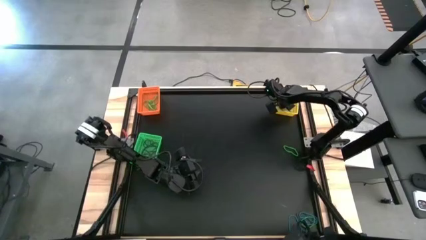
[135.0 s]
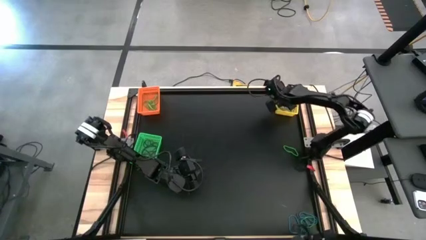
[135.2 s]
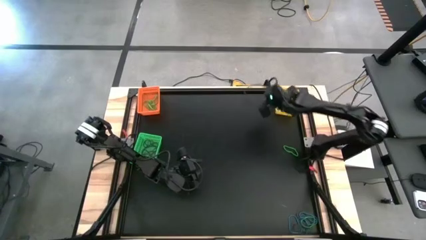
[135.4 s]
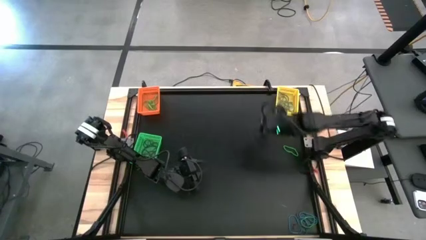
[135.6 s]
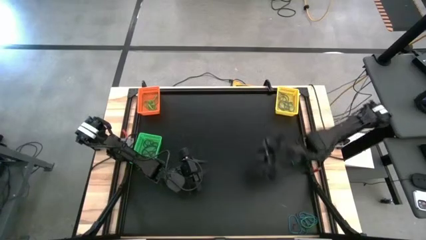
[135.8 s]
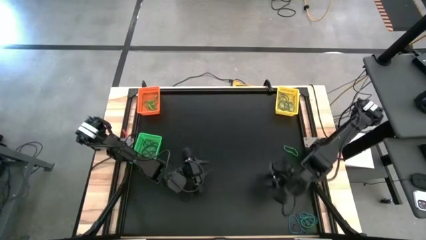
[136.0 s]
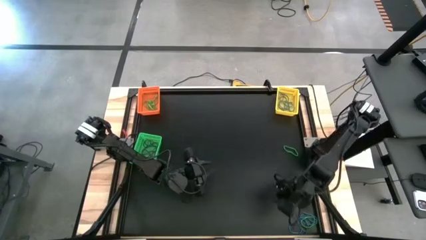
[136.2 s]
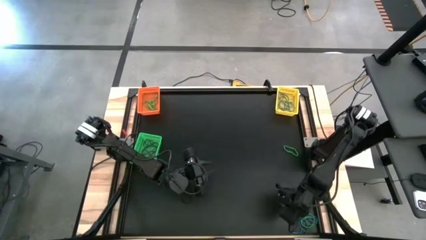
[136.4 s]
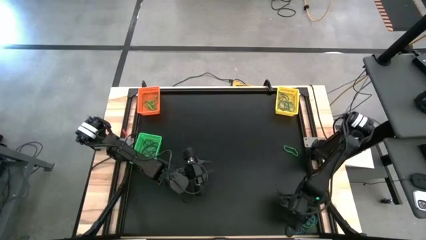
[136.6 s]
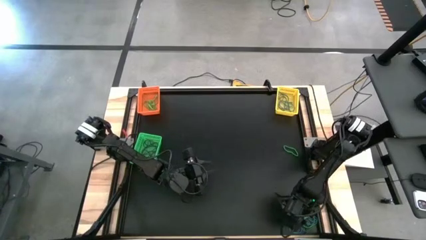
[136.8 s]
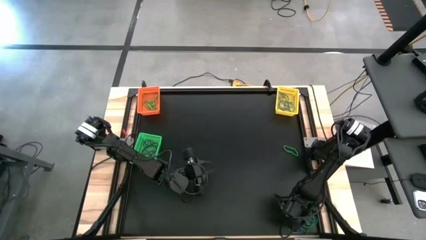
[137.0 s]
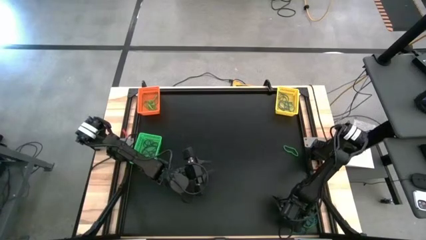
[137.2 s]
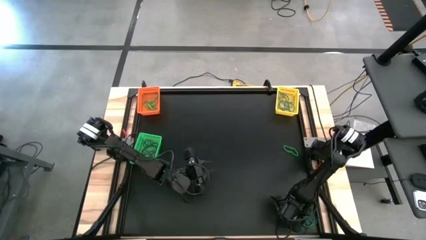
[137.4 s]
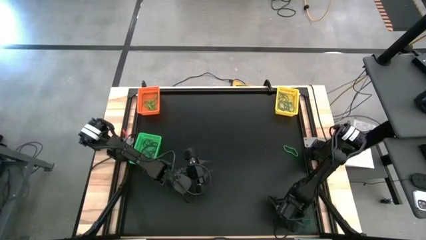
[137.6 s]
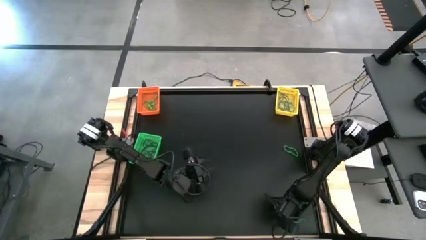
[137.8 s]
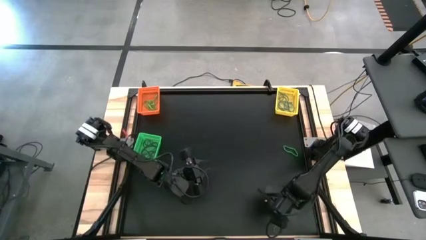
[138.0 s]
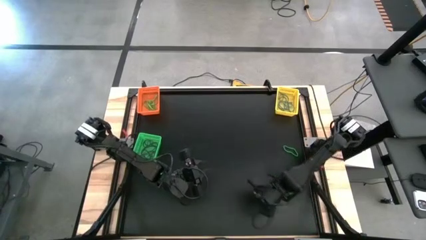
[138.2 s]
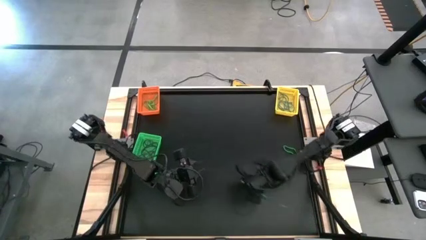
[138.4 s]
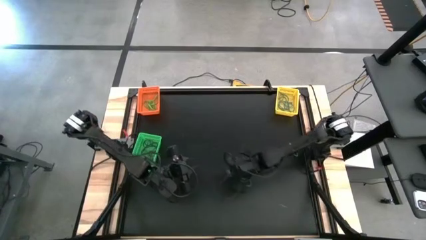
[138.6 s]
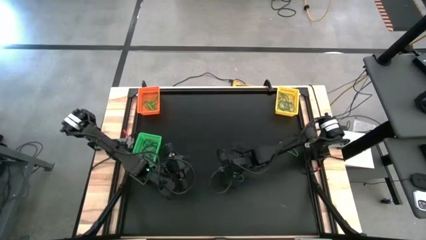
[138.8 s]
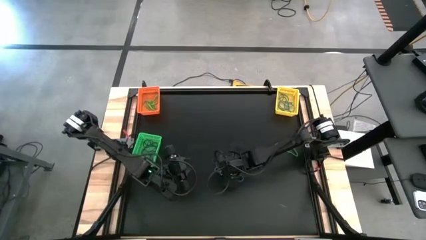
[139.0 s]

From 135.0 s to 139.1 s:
Task: Sort rubber bands into baskets
Put the rubber bands into the center of the table

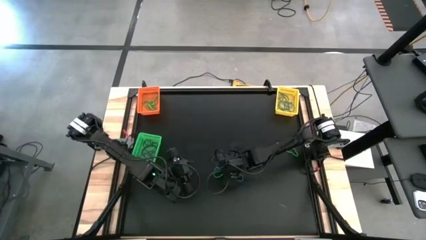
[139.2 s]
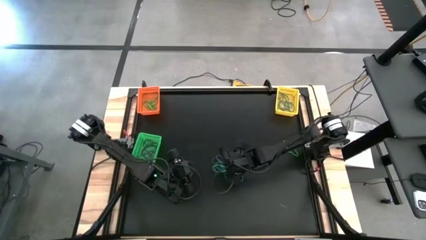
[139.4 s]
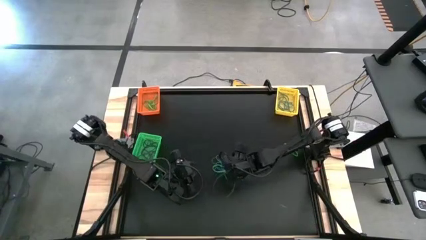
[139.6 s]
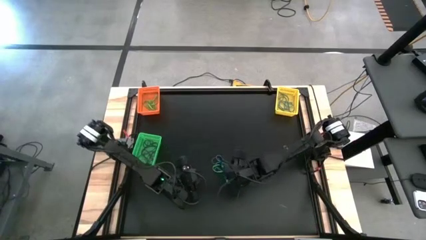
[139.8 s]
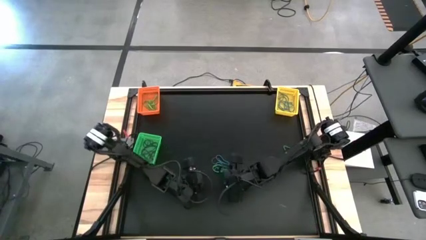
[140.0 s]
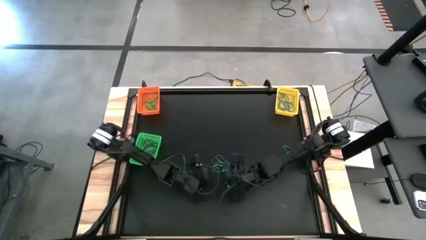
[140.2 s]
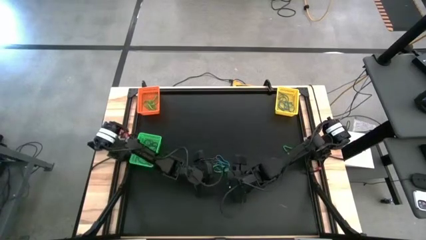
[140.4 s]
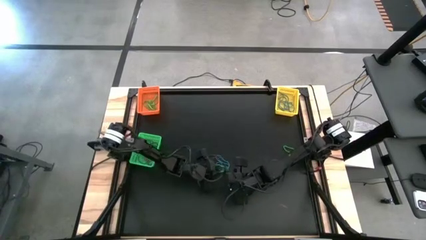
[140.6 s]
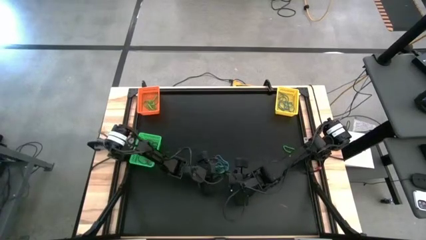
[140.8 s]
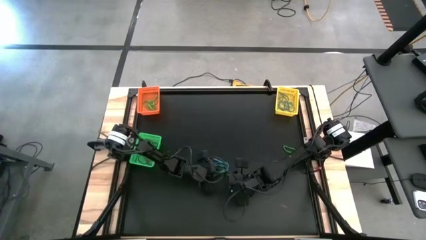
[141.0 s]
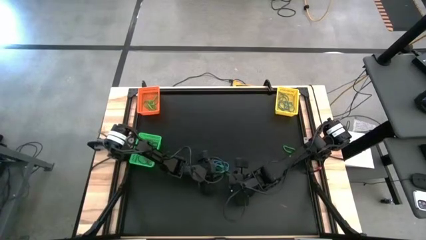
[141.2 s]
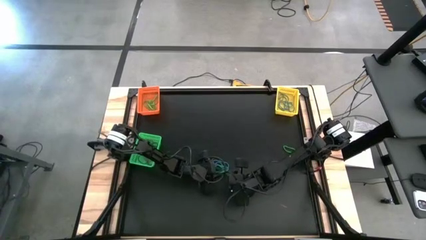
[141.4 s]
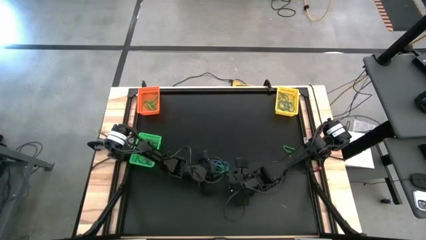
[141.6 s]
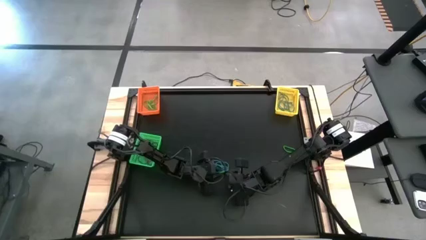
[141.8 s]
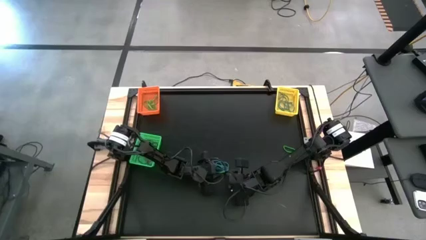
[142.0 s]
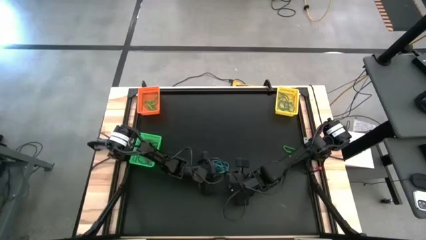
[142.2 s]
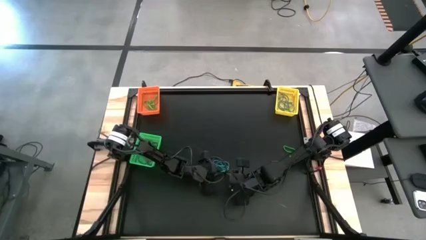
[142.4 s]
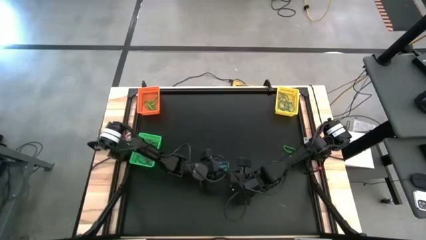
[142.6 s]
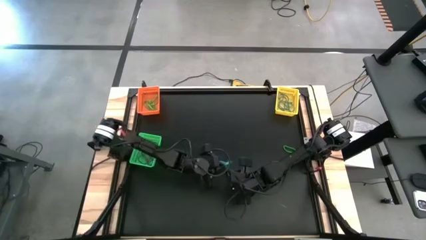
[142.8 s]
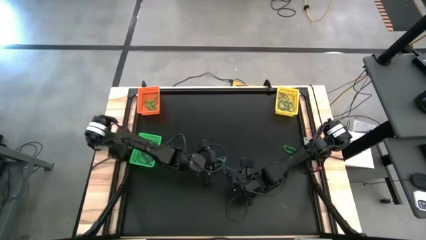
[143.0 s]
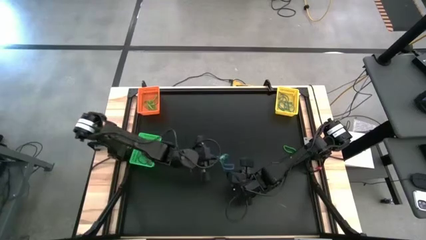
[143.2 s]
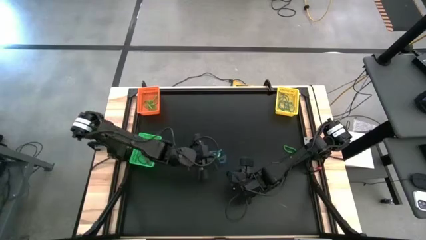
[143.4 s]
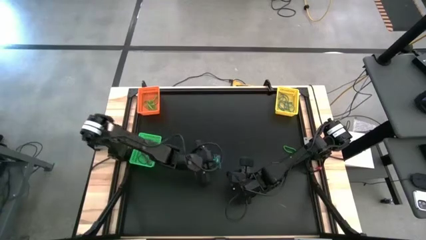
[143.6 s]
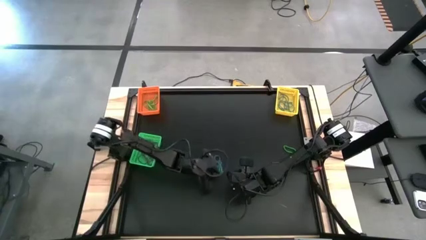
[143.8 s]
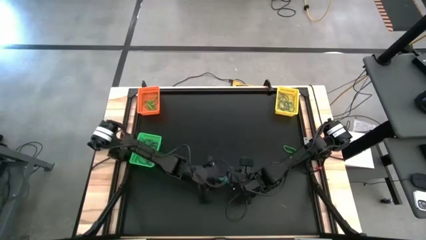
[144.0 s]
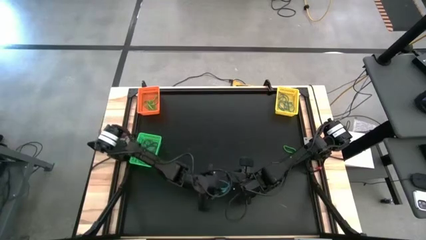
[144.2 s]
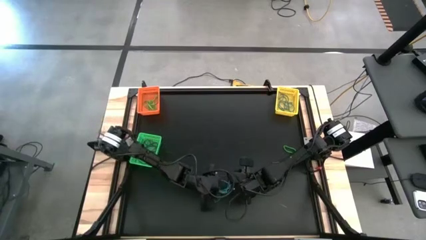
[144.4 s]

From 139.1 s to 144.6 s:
Put the center blue rubber band into the yellow bin

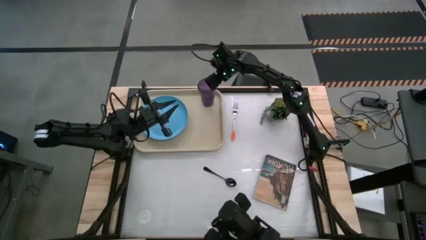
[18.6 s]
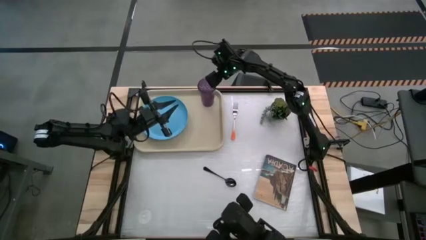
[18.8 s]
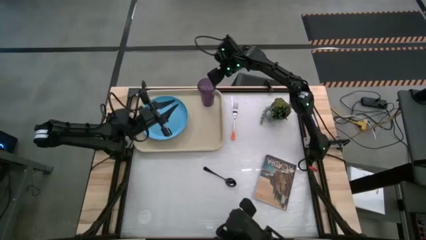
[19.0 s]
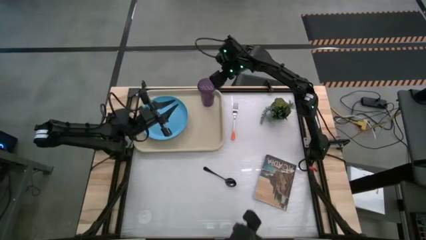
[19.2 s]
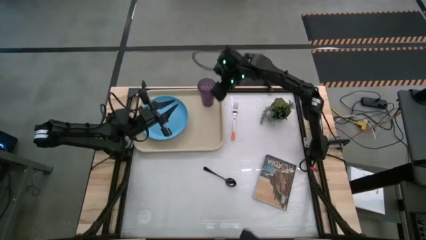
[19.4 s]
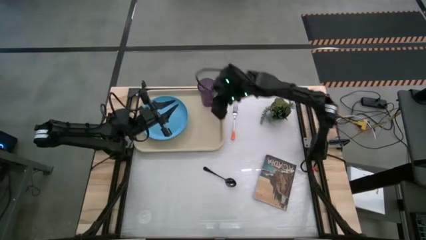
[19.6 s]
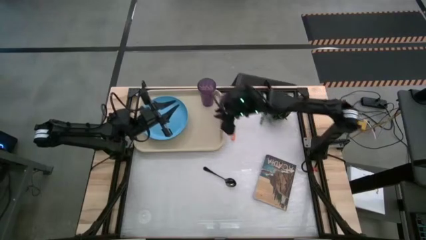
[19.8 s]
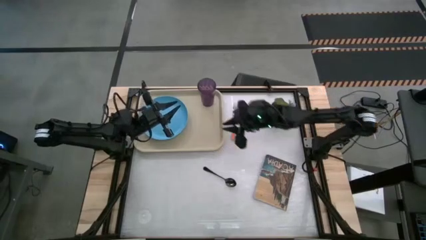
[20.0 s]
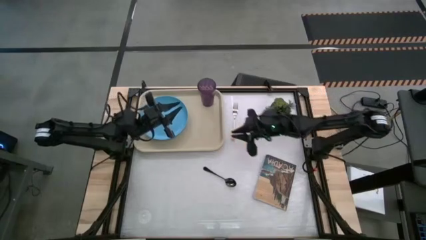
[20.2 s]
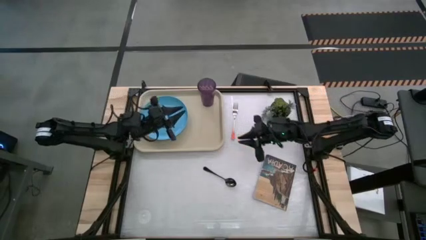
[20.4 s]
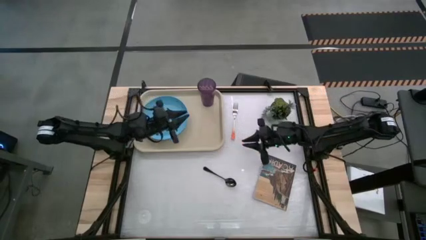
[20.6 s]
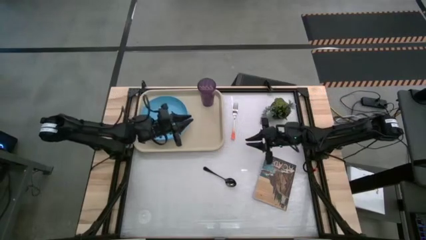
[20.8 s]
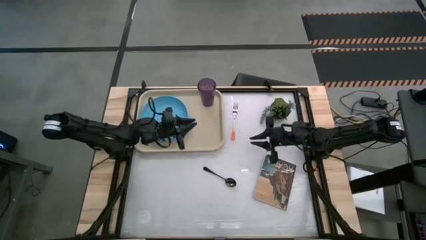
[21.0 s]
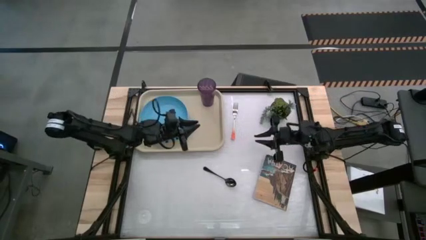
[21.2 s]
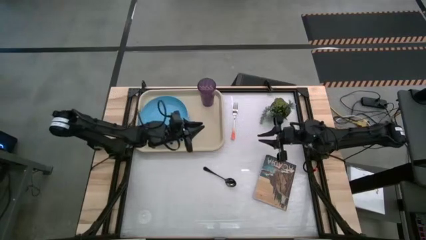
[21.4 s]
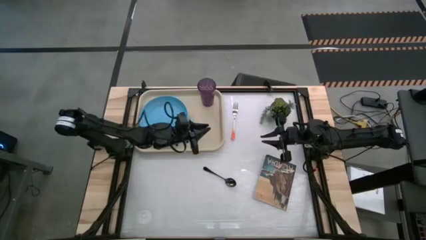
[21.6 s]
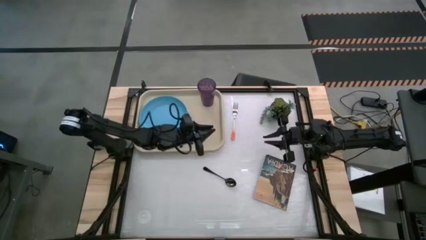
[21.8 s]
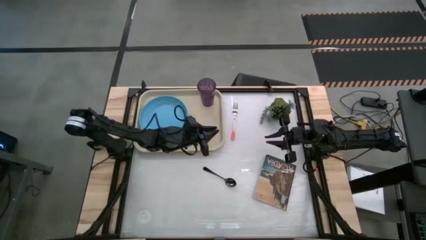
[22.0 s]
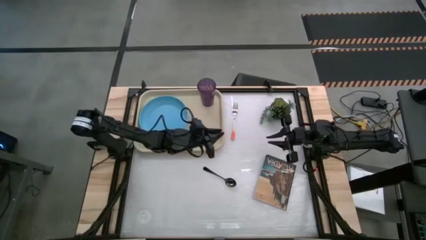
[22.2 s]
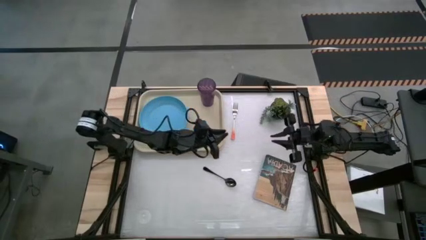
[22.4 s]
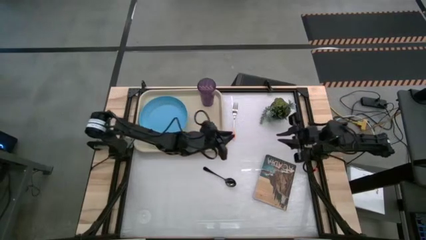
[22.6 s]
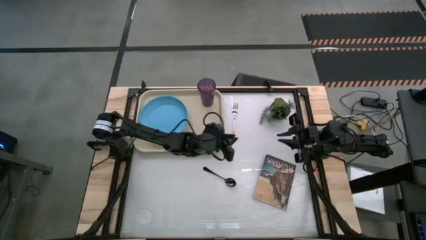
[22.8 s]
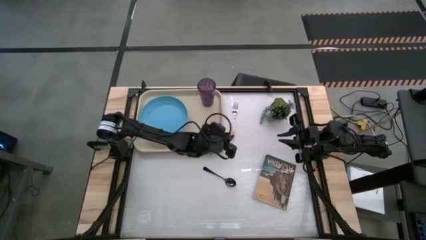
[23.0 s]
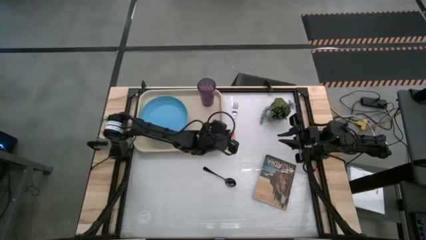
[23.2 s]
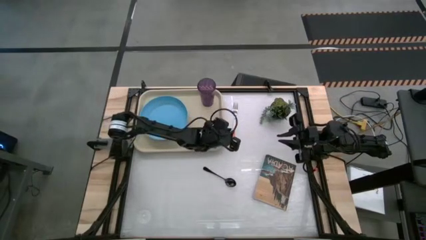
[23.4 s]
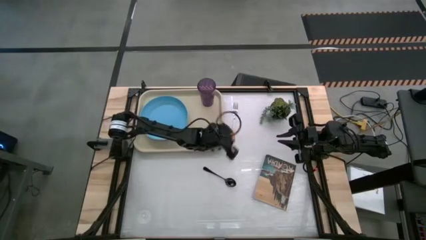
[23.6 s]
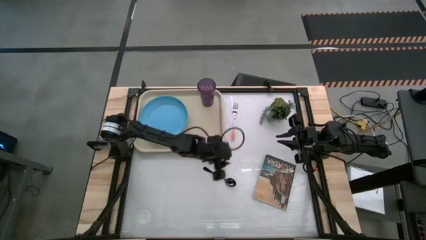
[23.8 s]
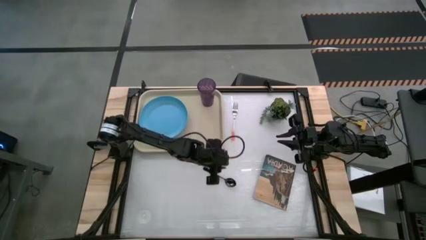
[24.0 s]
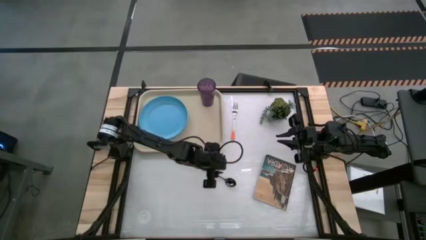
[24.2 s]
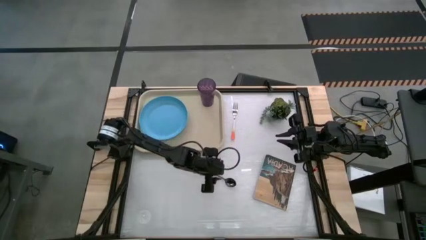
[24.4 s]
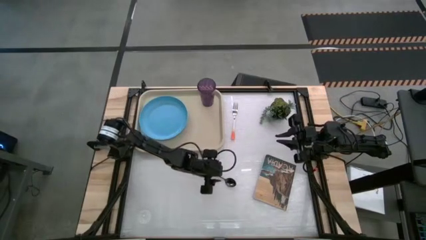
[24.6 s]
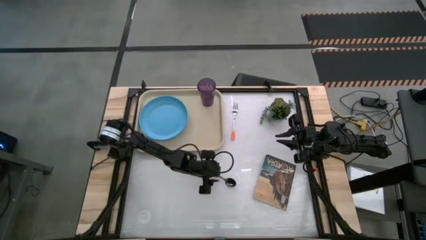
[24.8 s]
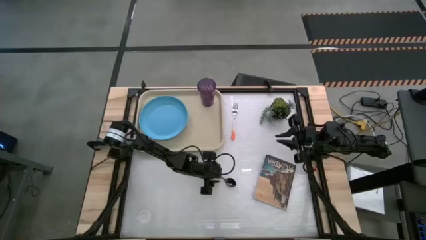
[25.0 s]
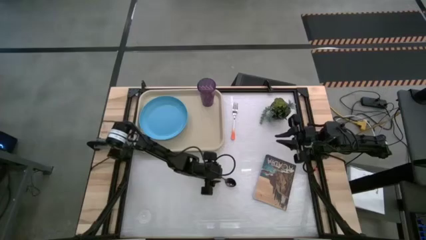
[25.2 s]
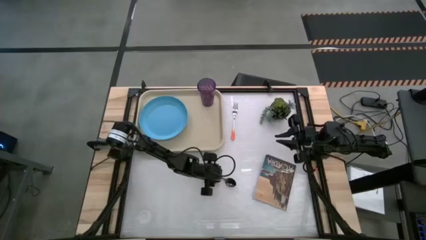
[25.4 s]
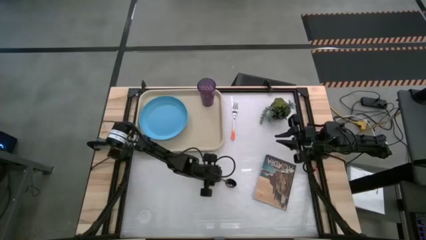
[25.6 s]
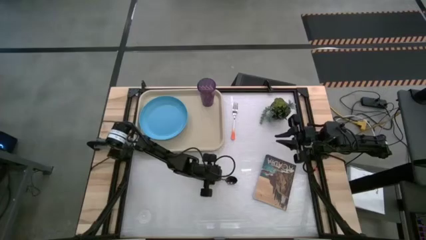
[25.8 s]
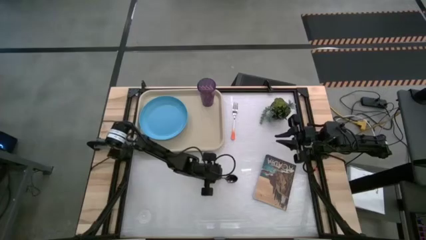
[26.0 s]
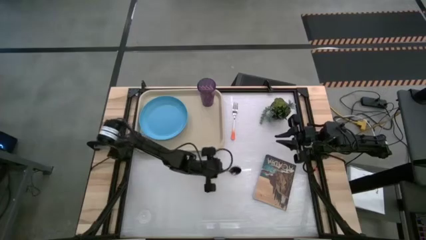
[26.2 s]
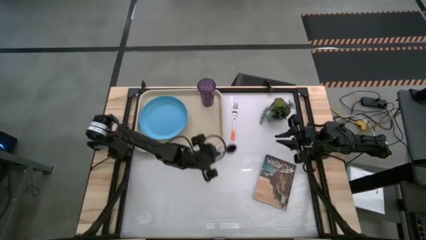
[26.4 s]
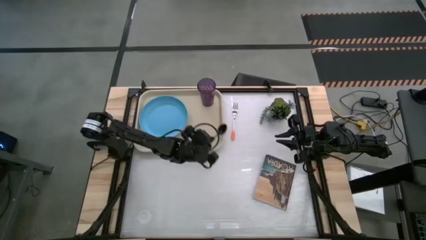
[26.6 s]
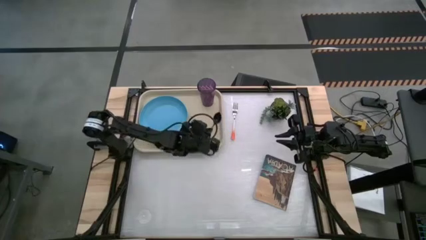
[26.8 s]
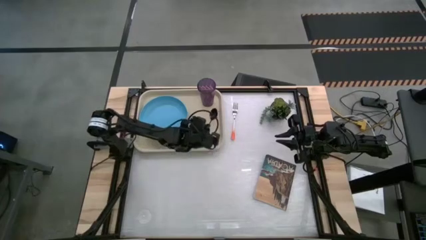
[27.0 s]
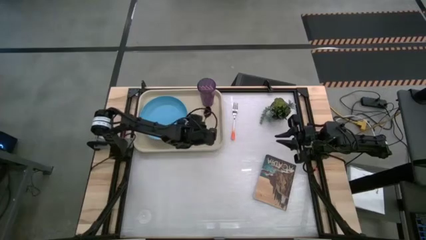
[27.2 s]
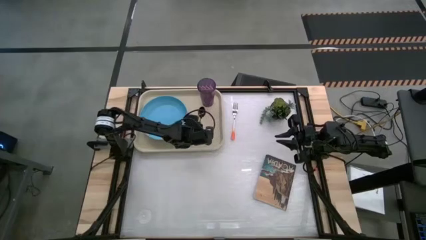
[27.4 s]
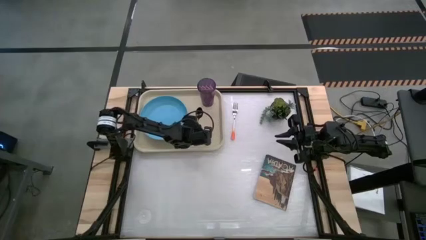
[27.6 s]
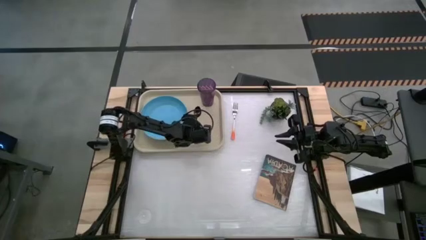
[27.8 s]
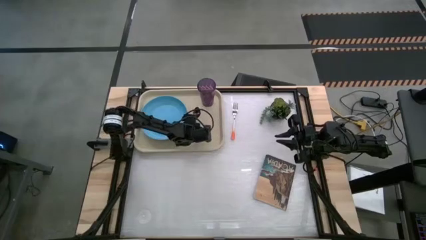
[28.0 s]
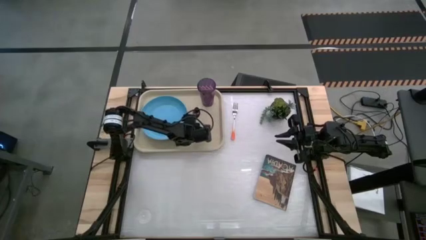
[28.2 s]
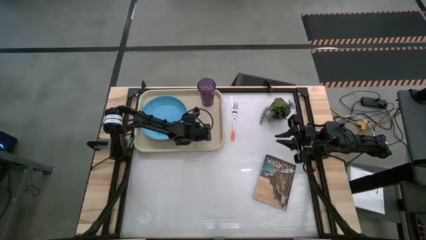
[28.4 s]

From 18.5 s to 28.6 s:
Task: Pick and place plate/cup/fork/spoon on tray
Put the black spoon on the brown tray to the right side of the blue plate
